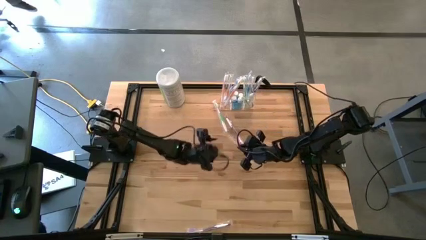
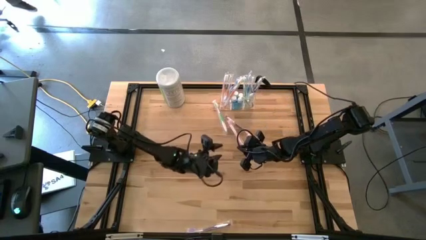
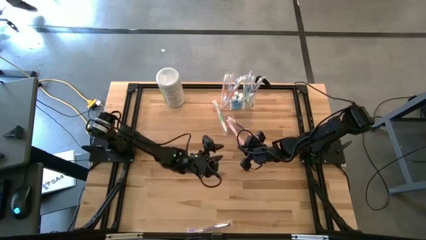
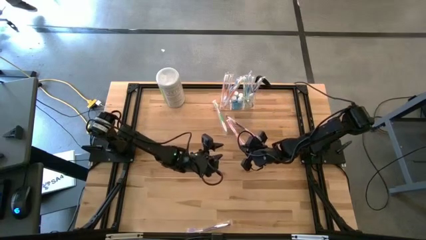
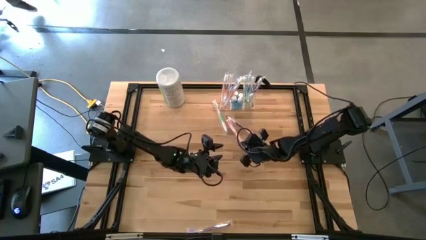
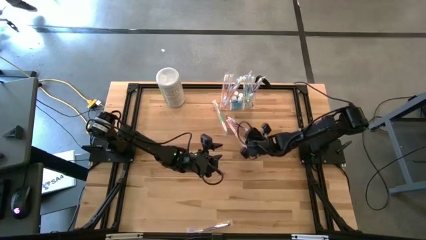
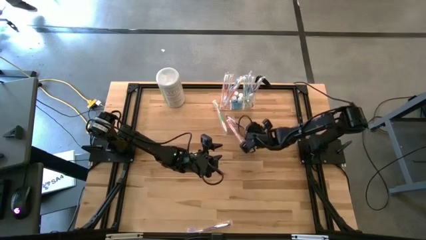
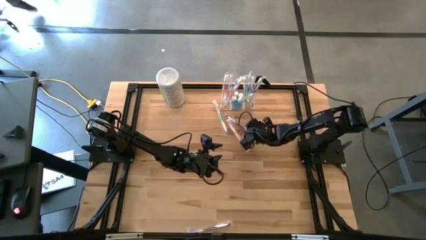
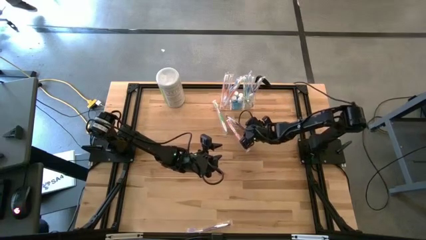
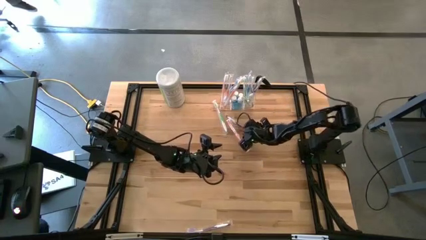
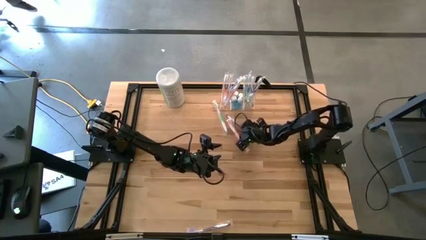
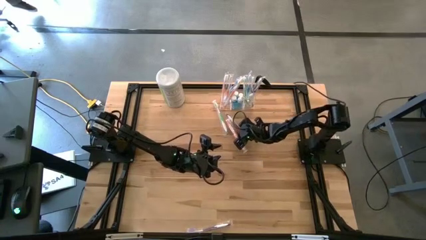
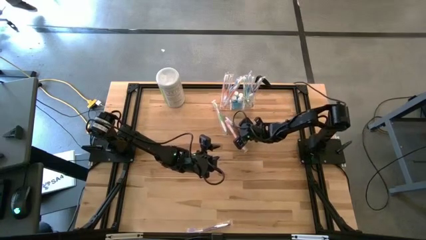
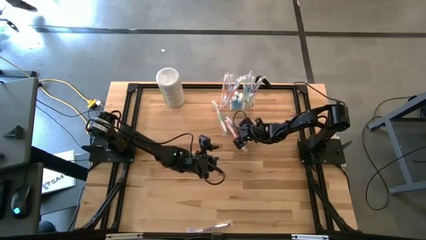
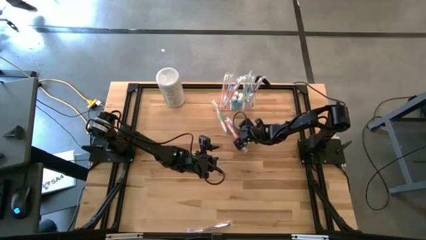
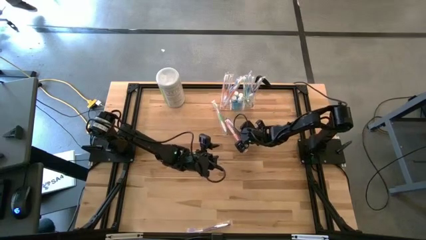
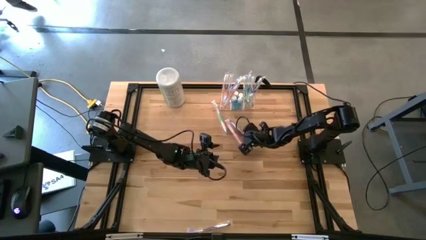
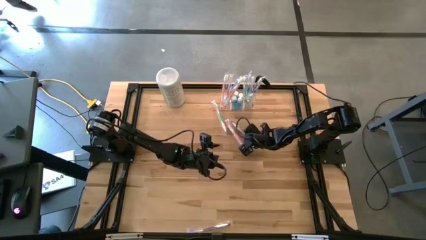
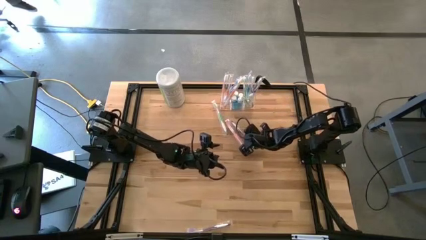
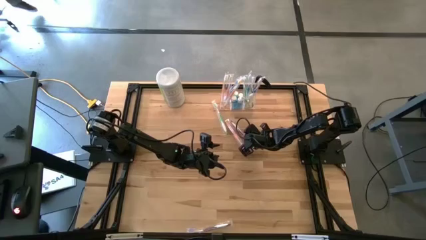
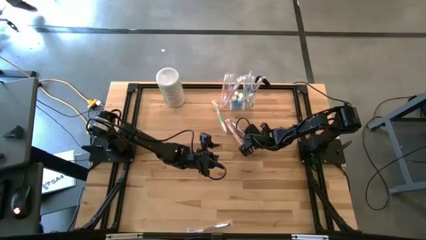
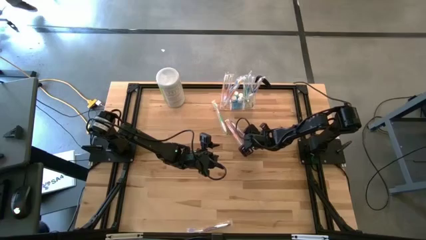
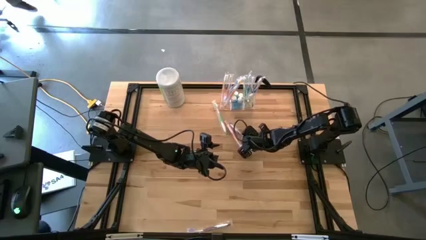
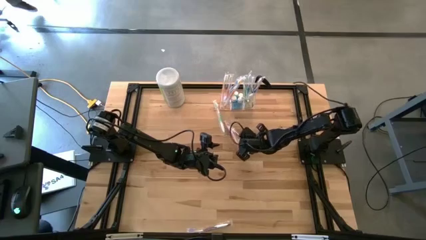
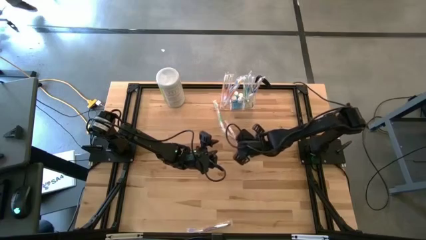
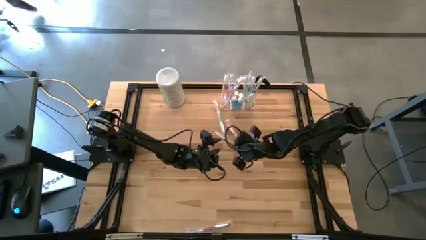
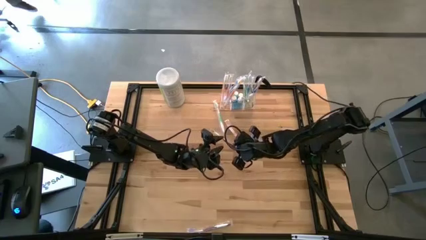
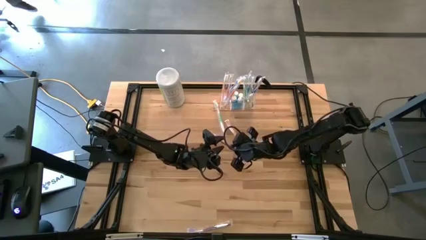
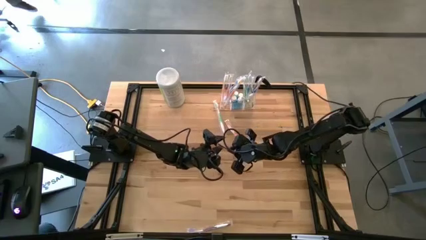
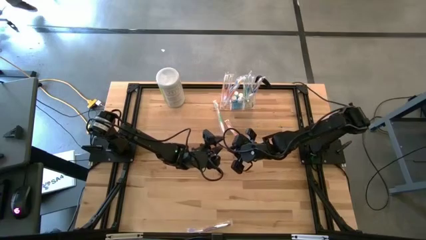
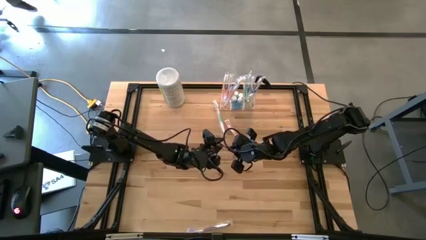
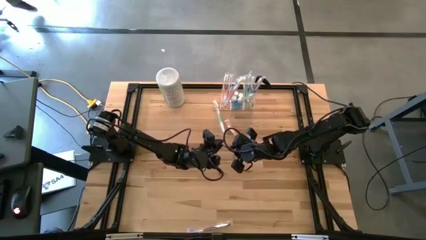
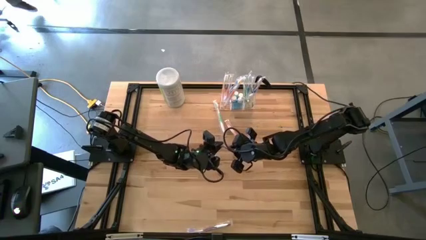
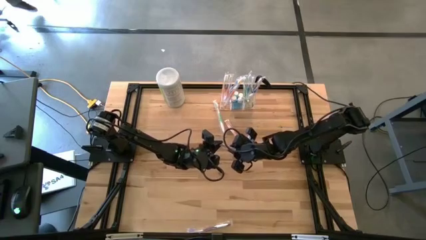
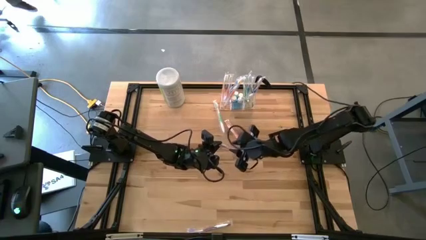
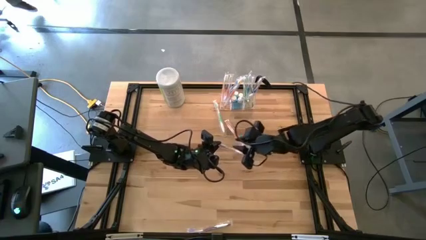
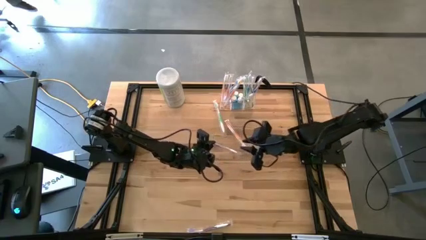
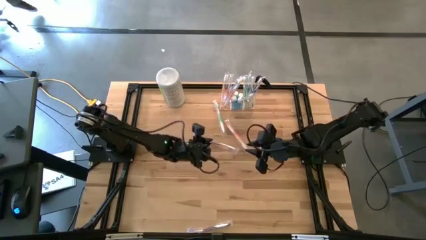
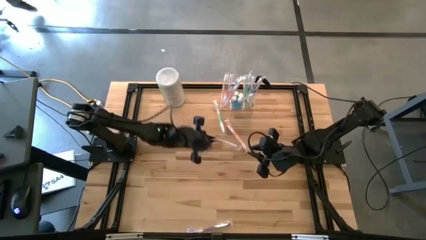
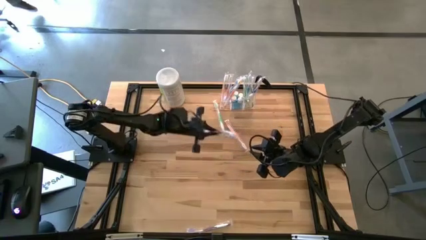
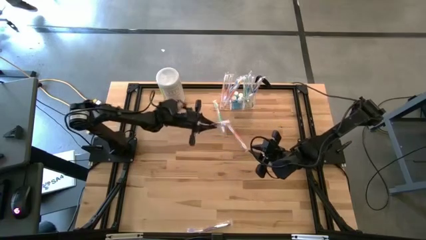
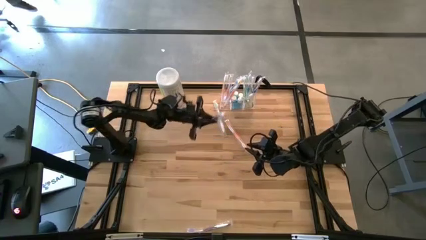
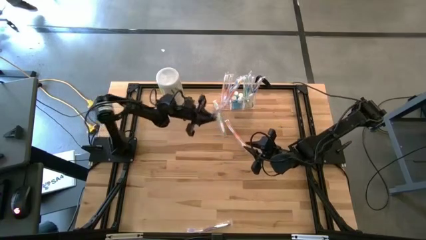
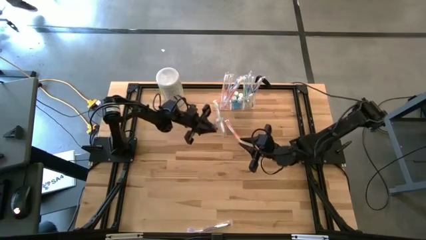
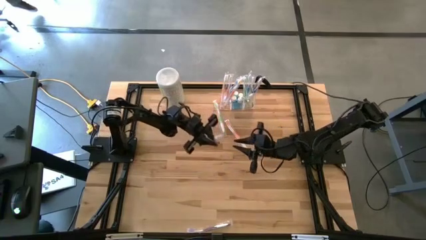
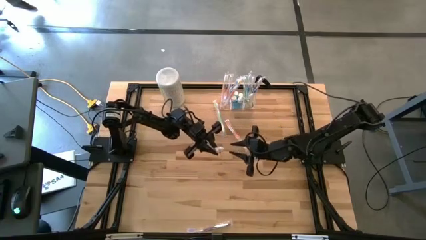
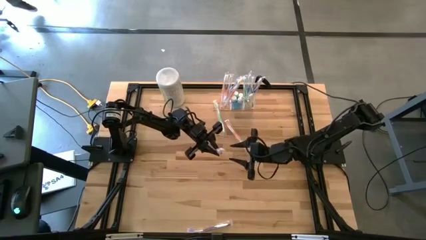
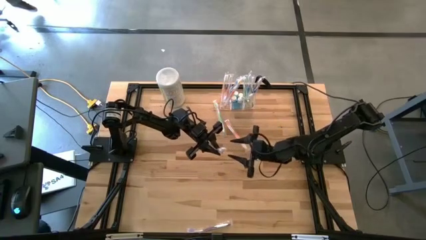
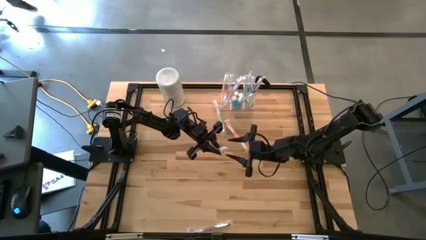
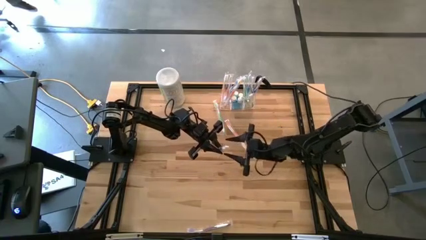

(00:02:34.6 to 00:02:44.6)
Task: Pick & Place toothbrushing station
Put the violet toothbrush into the transparent organizer

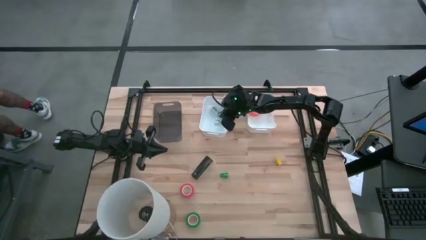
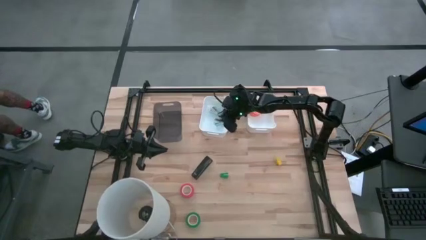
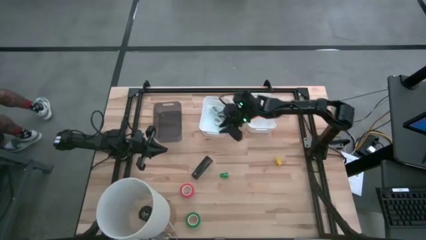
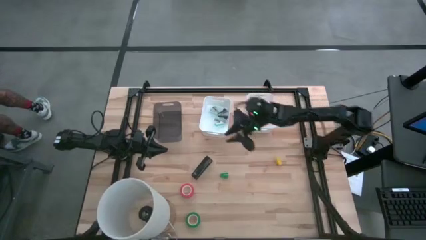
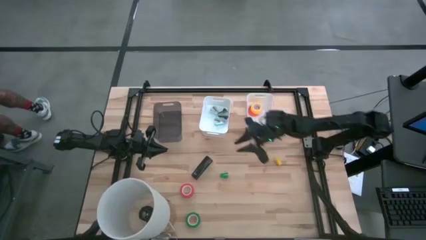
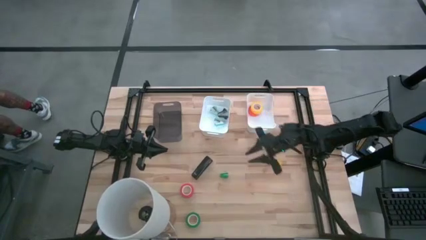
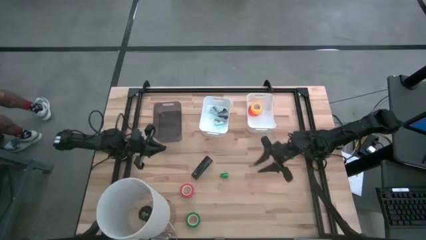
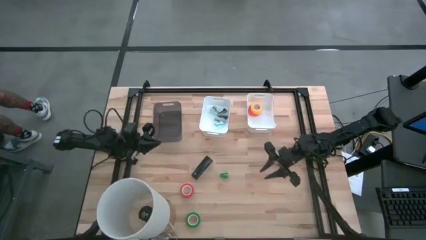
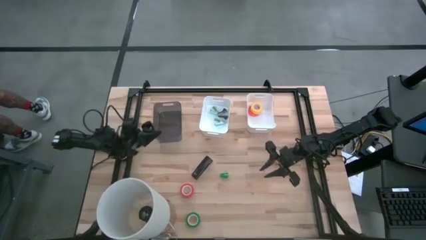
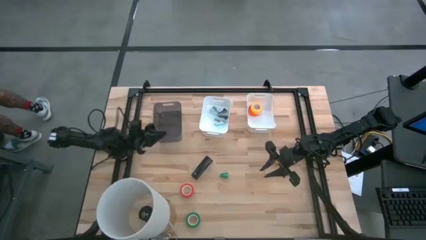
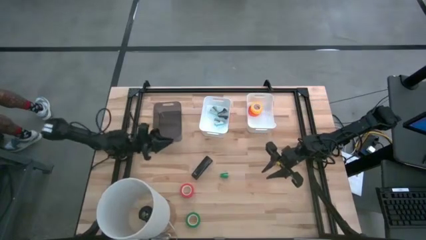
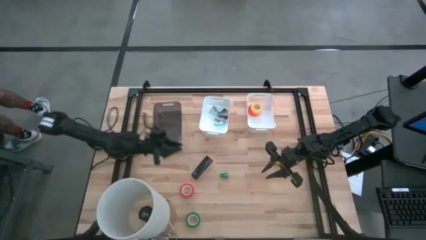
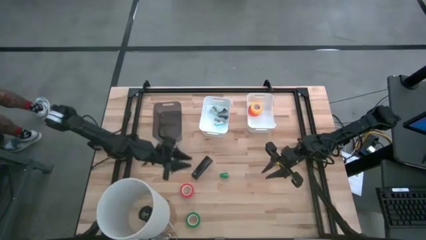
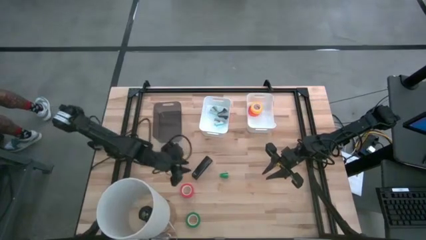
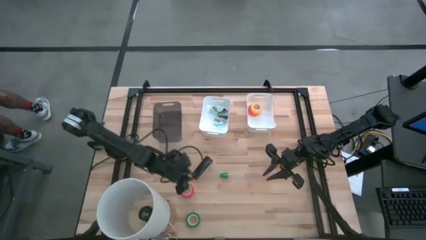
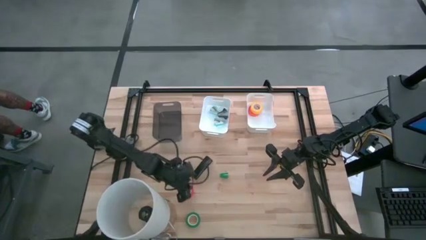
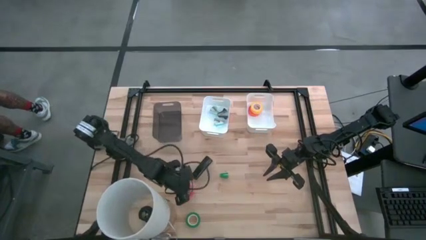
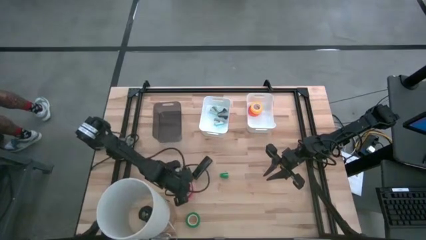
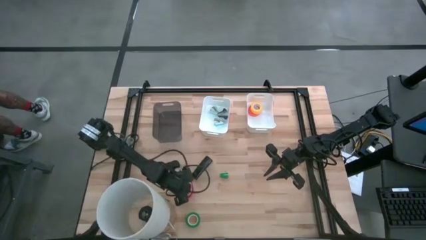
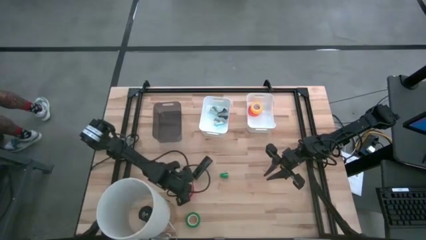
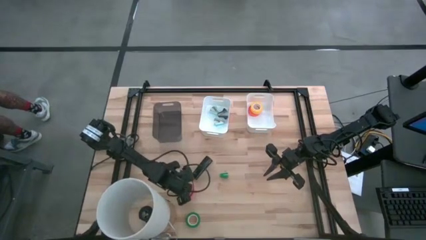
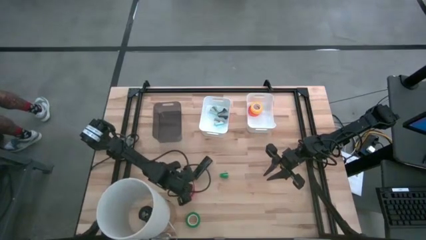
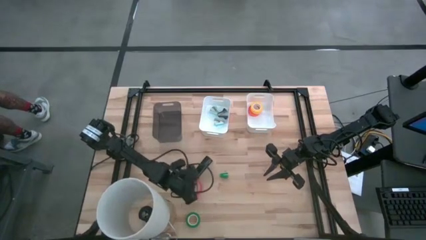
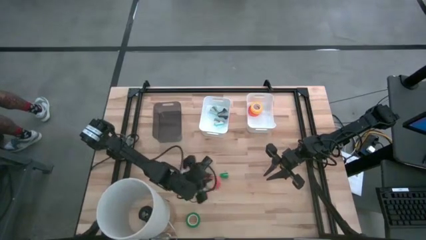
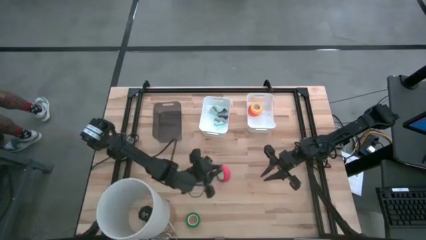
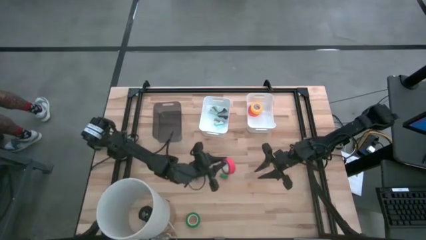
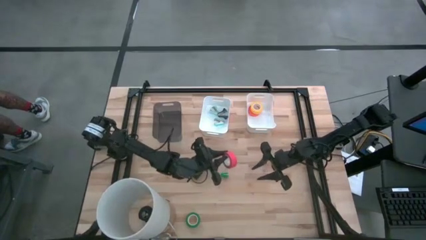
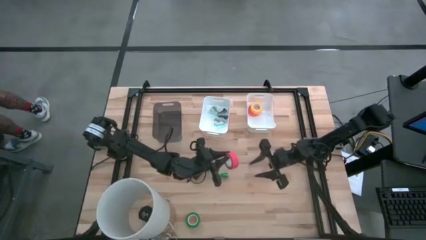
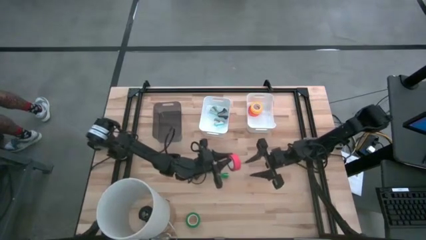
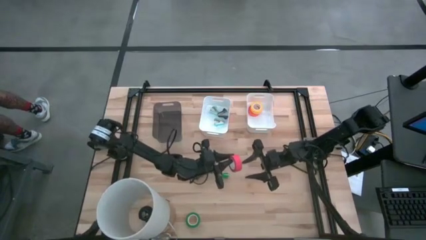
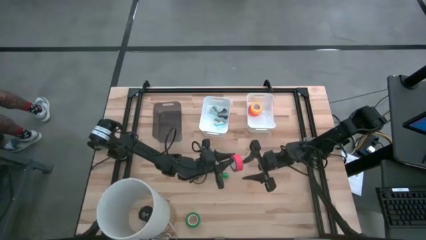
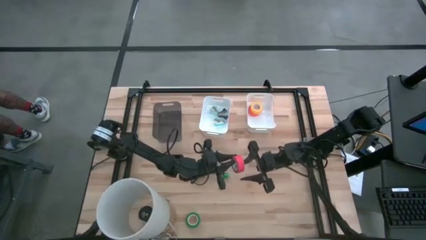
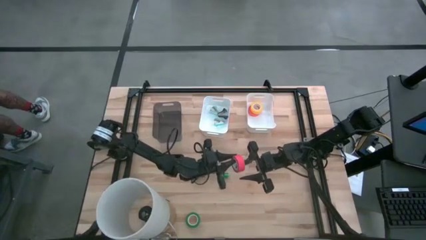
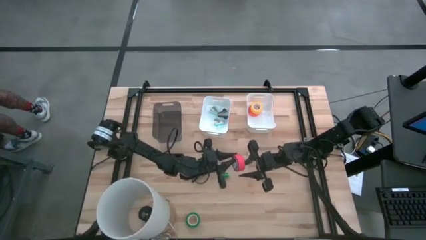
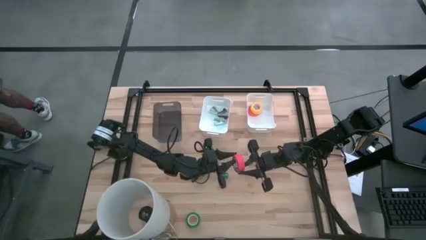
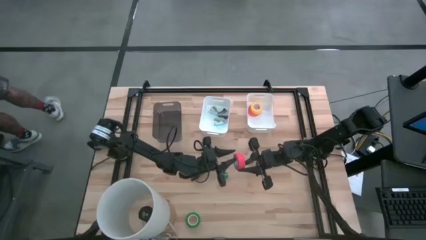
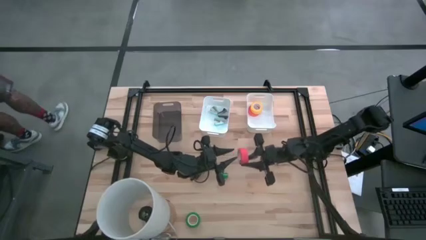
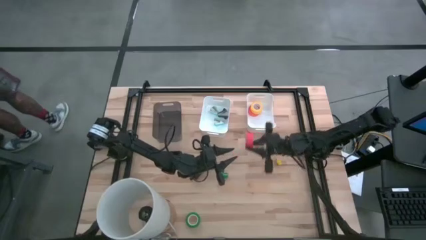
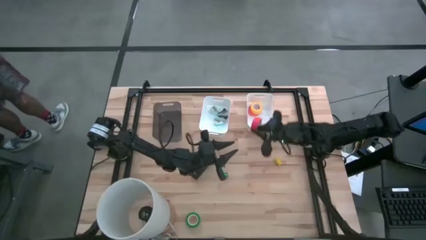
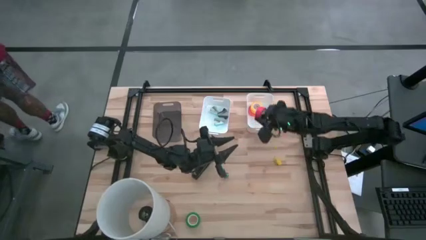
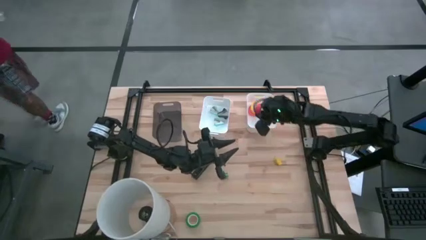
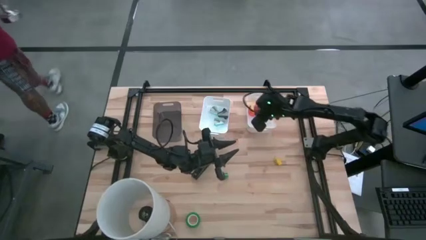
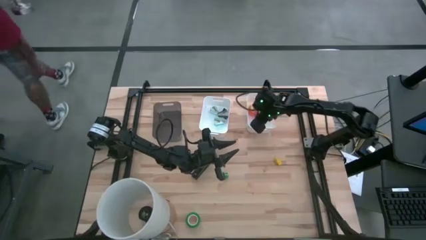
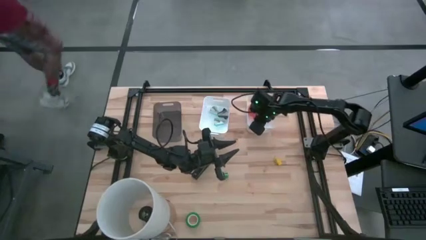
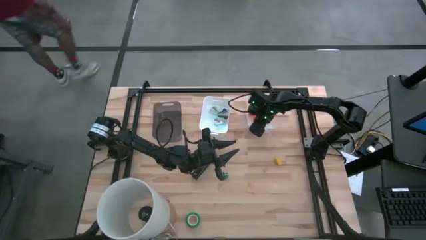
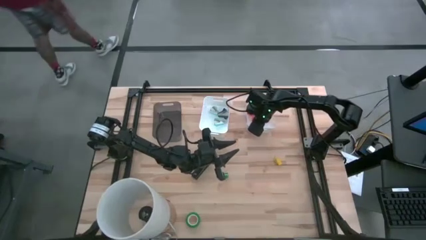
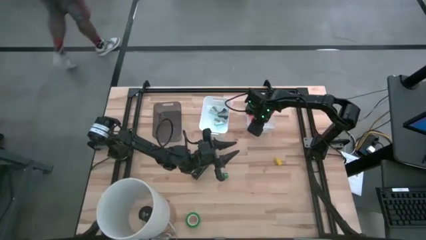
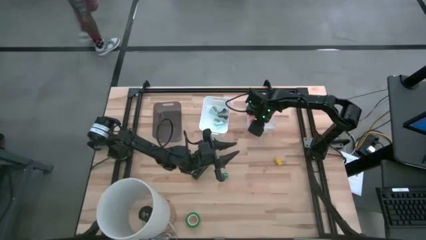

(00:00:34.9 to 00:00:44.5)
Task: Pick and place Stapler, Stapler remover, tape
Put the red tape into the right white bin
